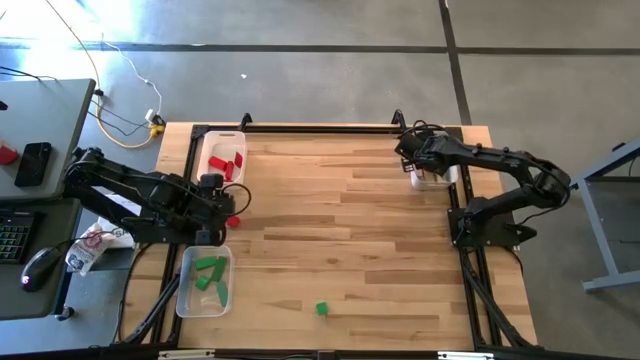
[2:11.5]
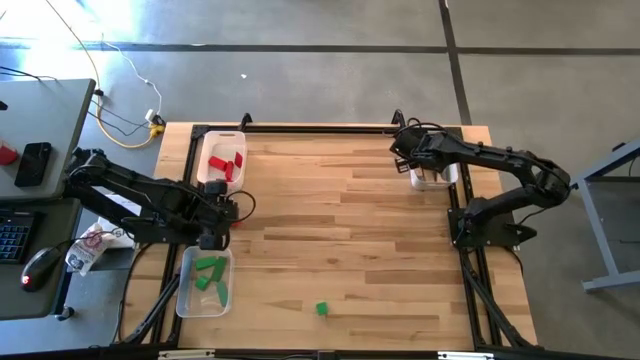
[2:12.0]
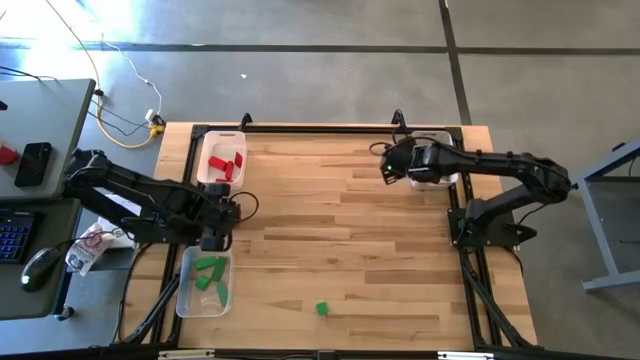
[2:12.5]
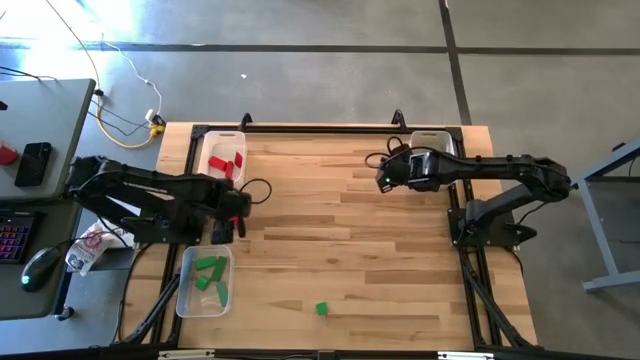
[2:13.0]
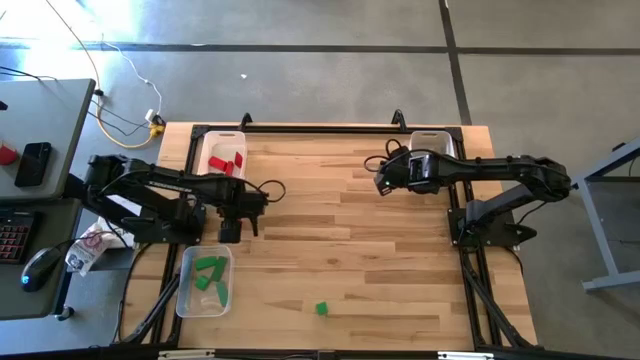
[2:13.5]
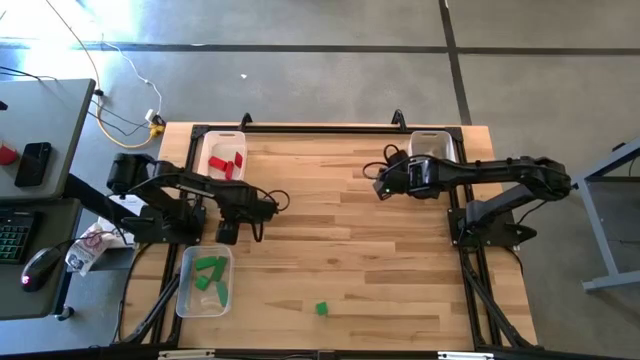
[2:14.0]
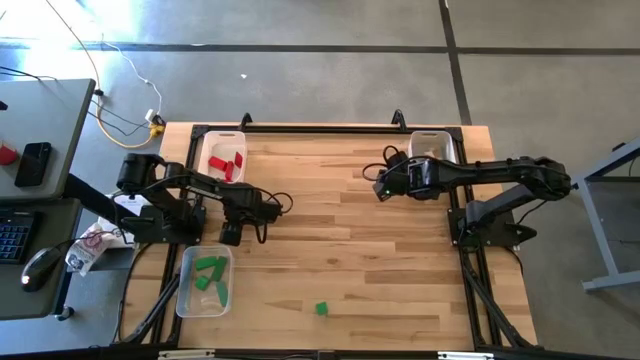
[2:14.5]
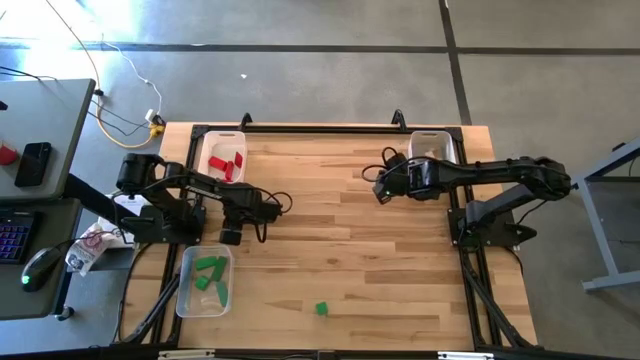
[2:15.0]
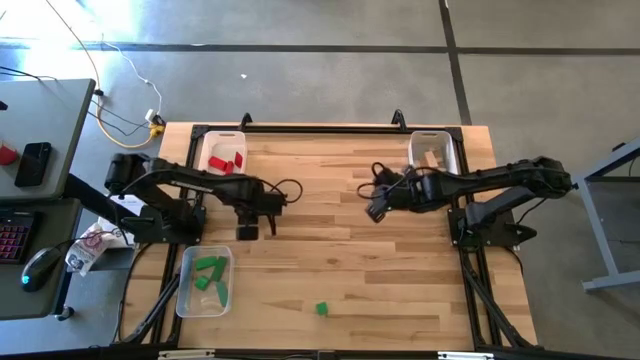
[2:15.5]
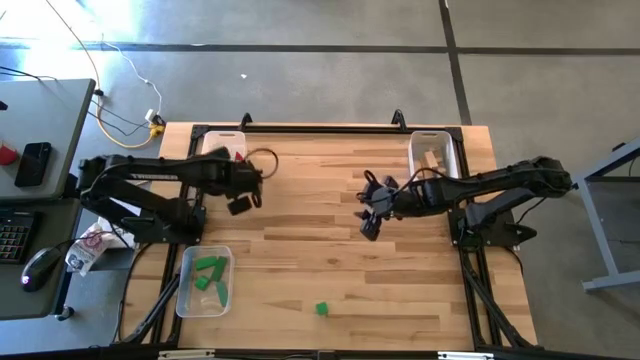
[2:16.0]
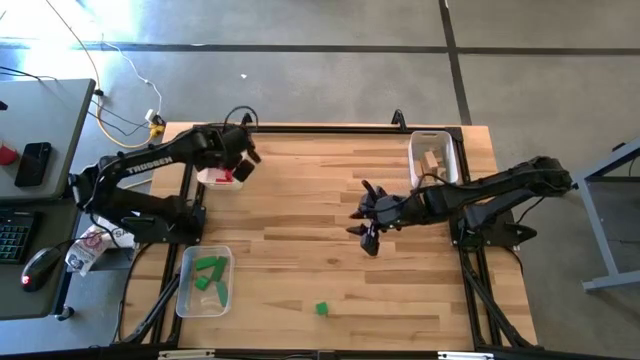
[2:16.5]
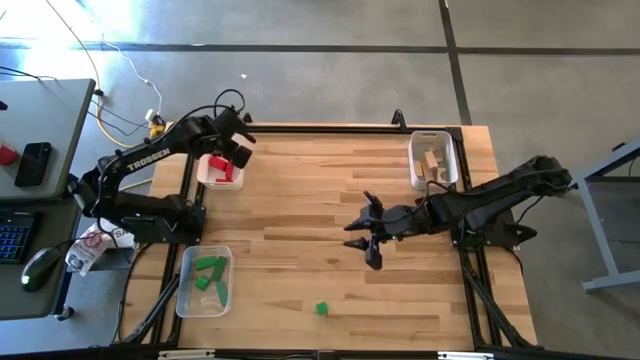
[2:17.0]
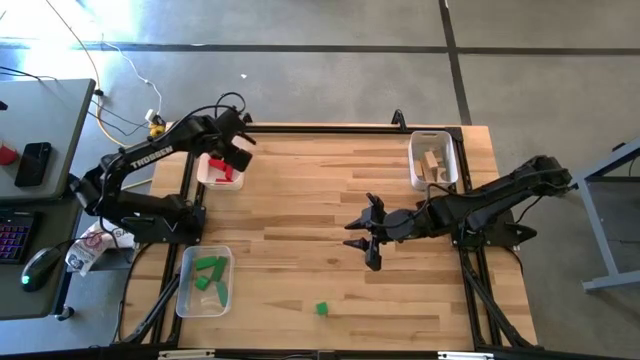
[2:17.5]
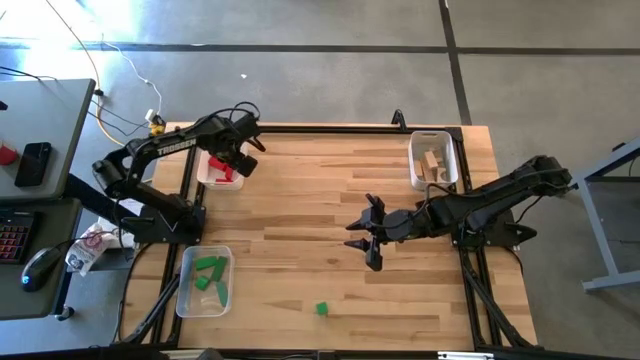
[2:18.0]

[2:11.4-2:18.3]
Task: Sort & place blocks by color
Put the red block into the white bin

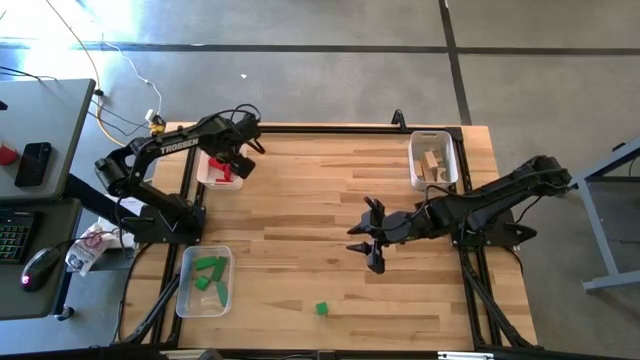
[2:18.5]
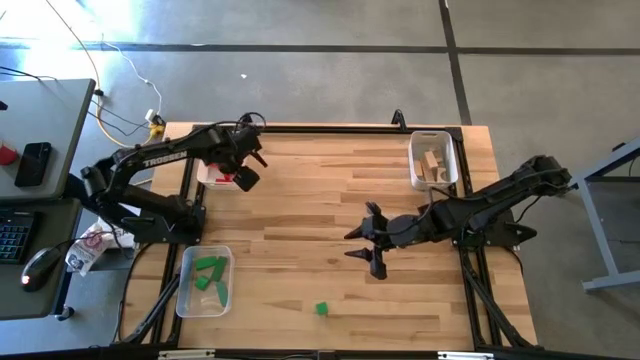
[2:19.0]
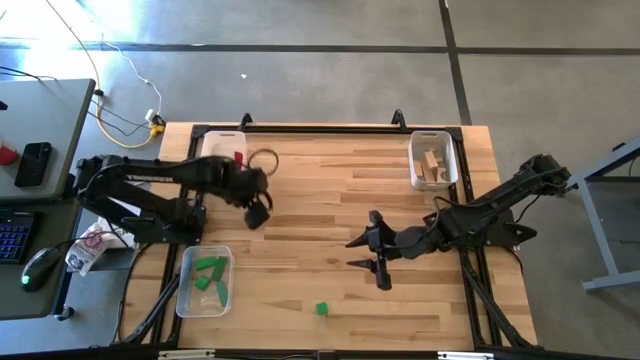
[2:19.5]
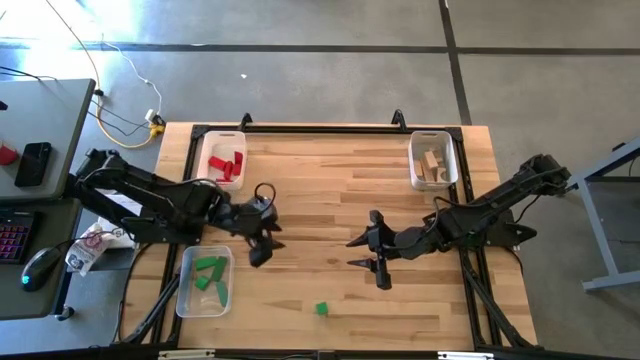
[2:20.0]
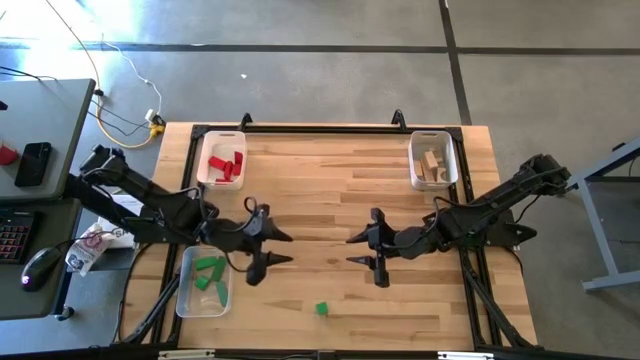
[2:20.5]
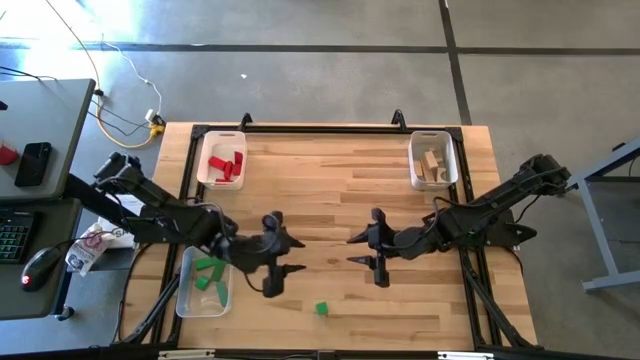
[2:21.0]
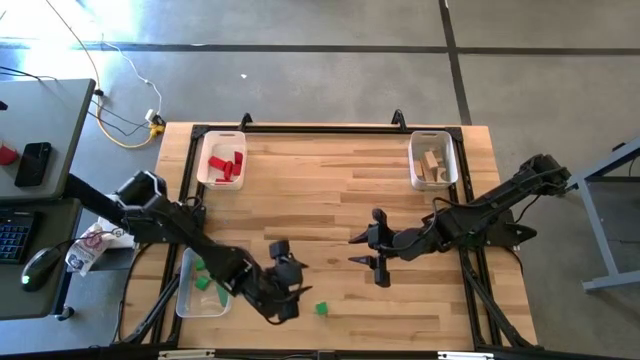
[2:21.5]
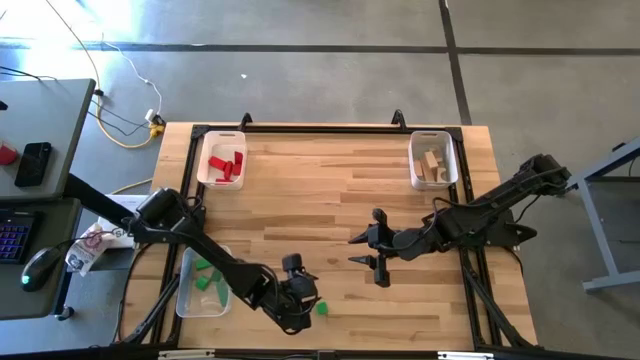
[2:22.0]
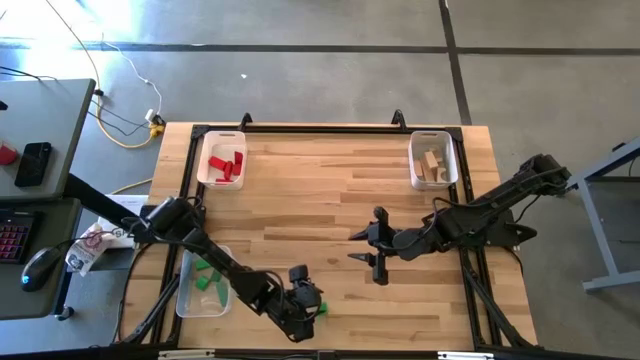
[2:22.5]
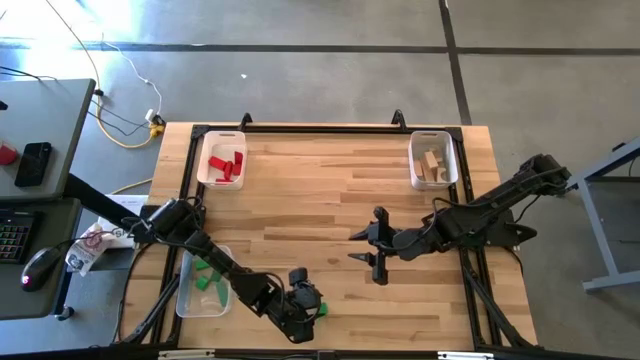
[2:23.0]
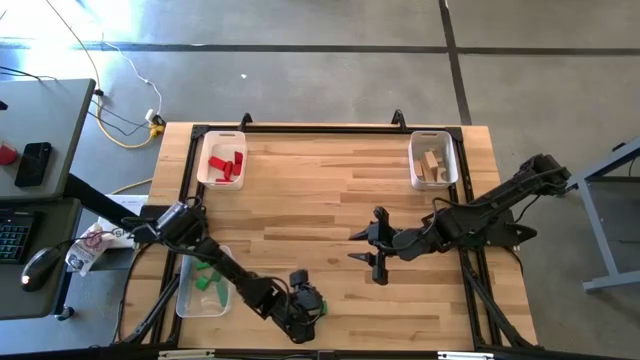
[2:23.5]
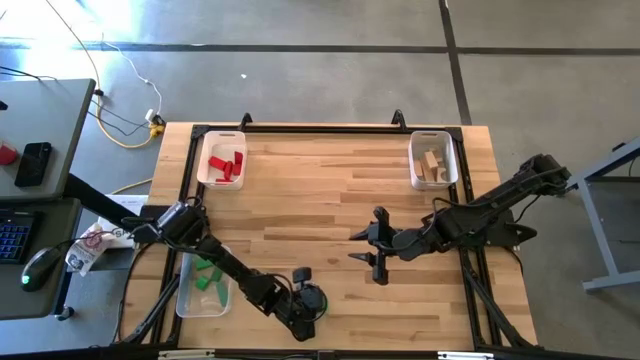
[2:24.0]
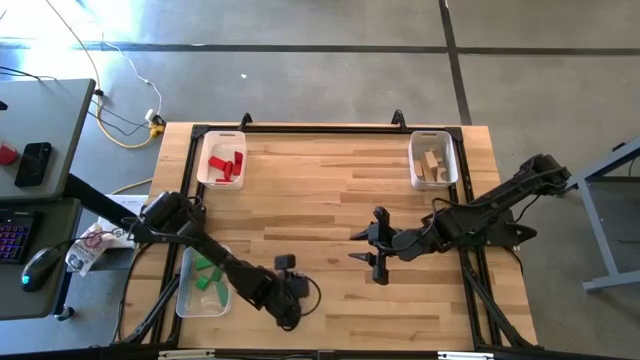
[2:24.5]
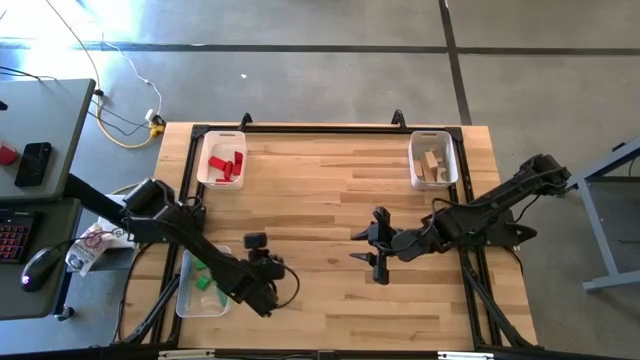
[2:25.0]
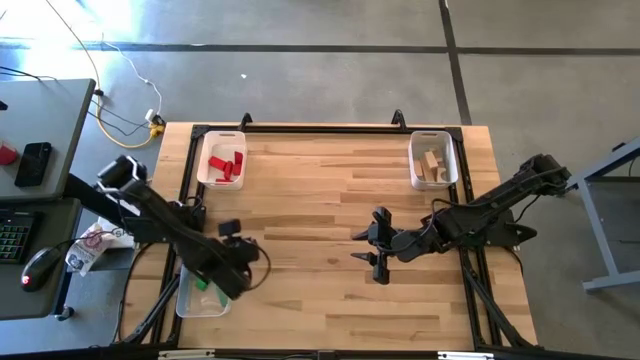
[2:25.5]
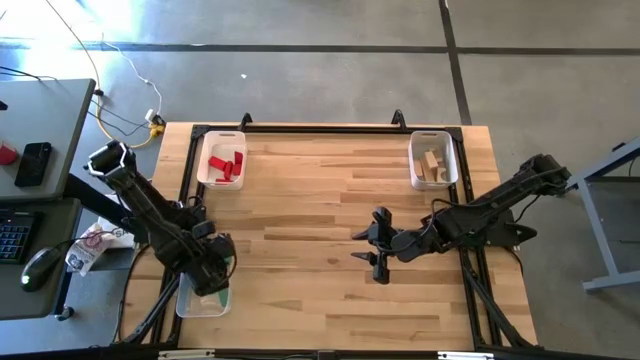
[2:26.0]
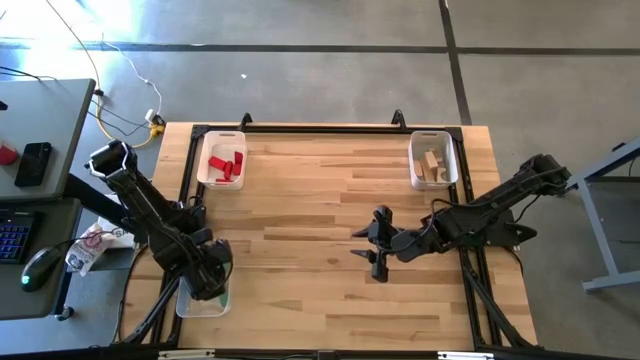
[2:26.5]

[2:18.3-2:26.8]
Put the green block into the transparent bin

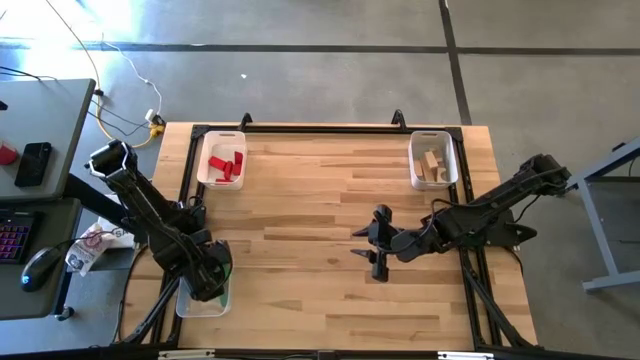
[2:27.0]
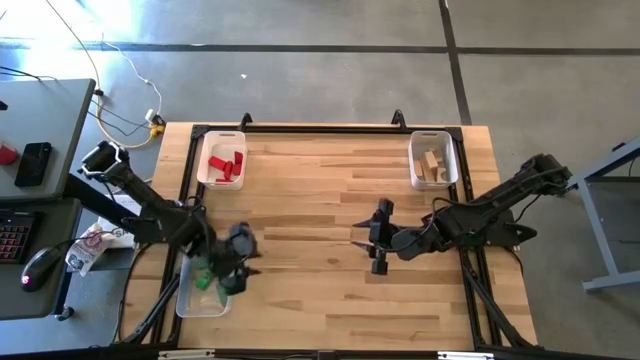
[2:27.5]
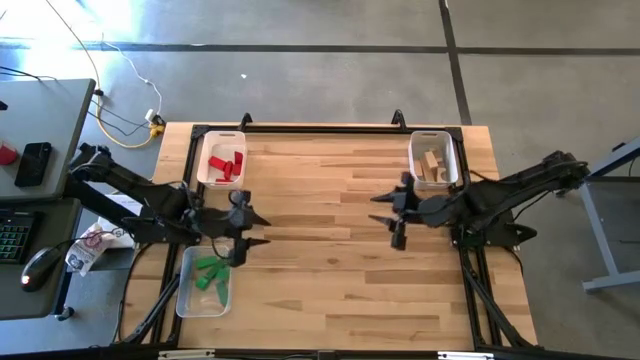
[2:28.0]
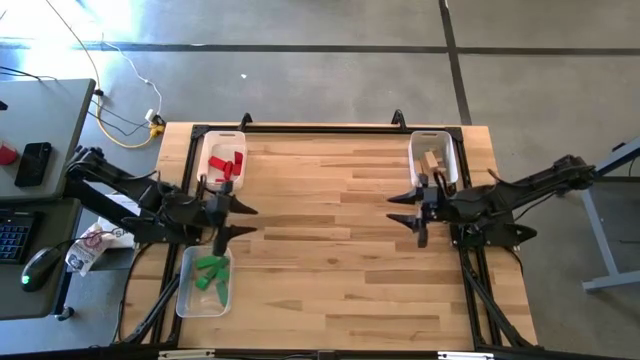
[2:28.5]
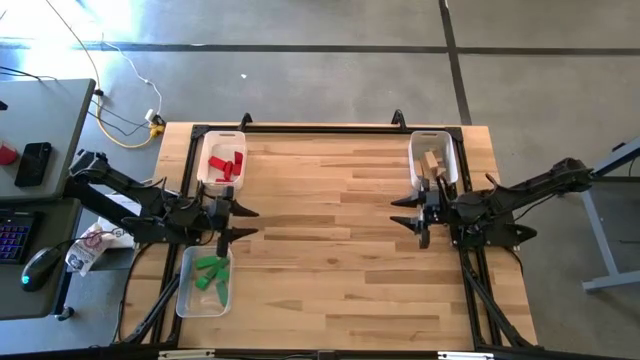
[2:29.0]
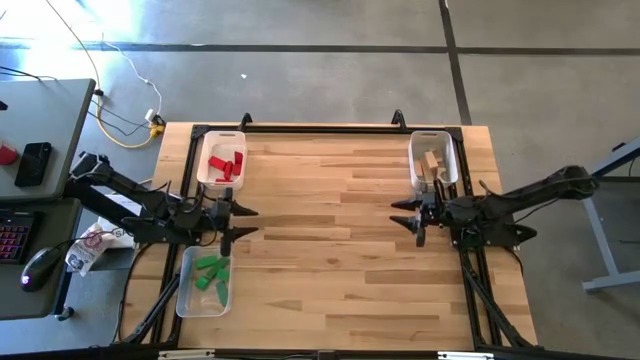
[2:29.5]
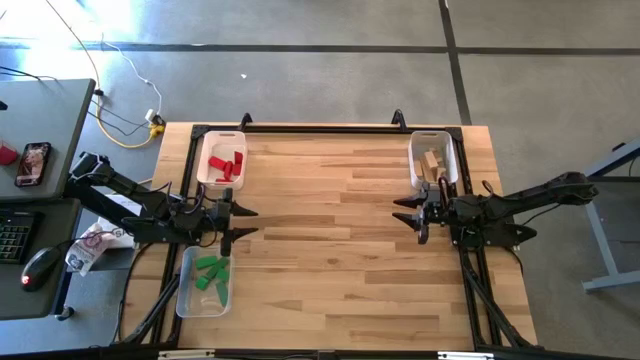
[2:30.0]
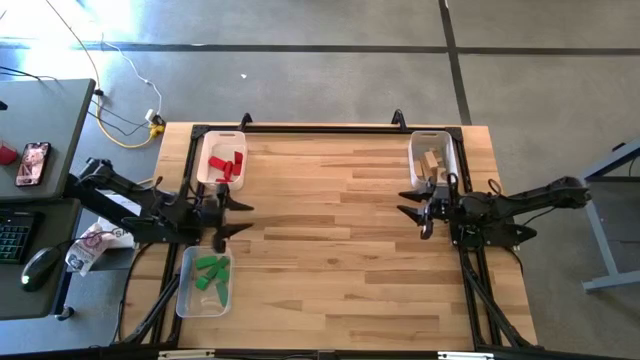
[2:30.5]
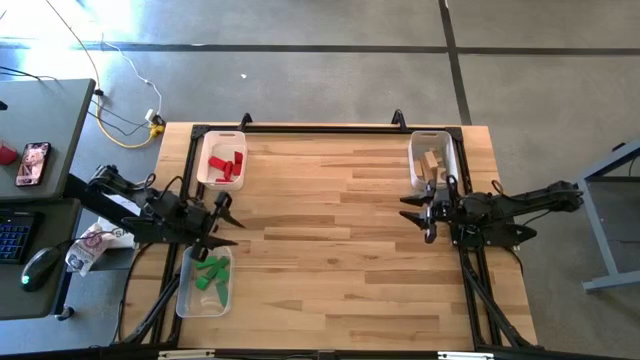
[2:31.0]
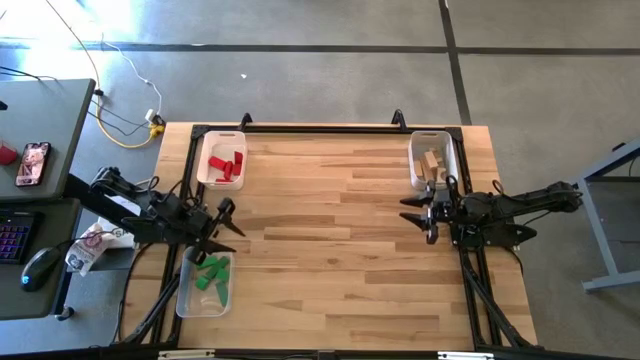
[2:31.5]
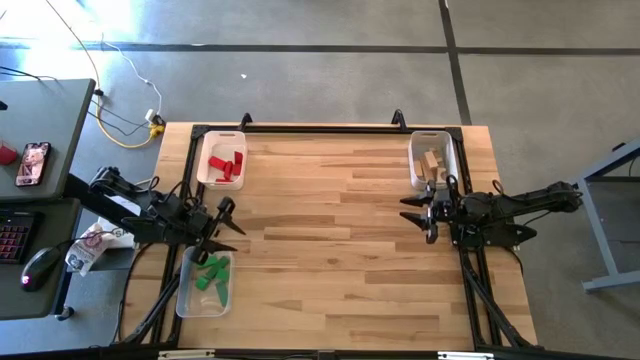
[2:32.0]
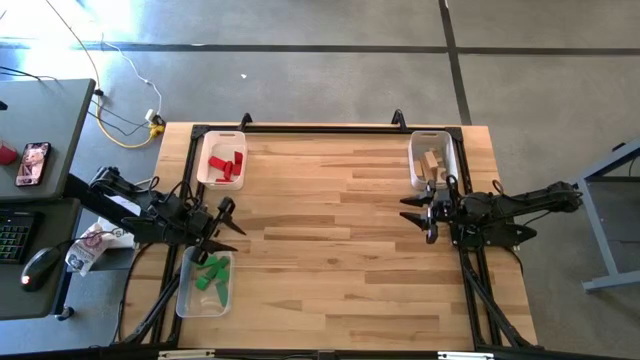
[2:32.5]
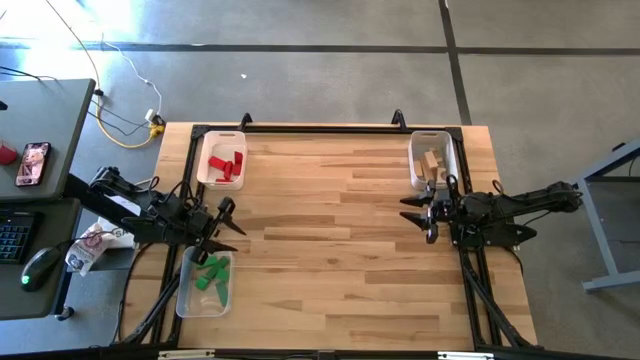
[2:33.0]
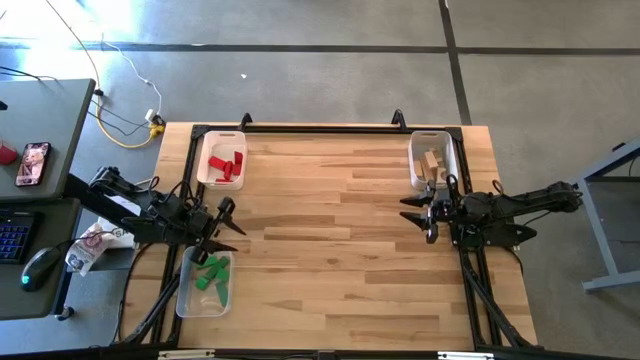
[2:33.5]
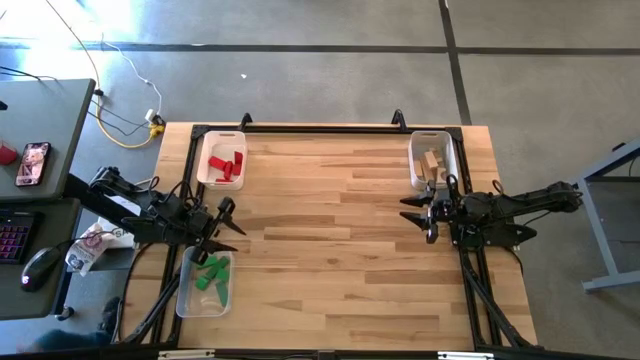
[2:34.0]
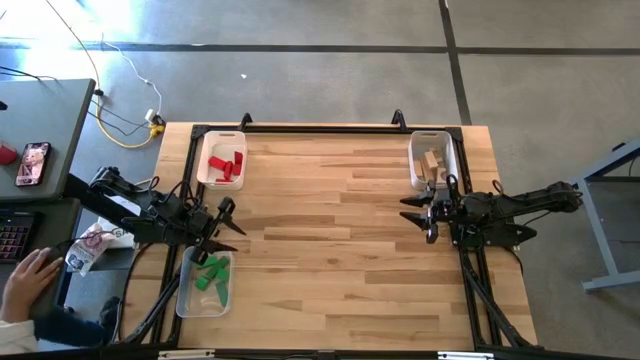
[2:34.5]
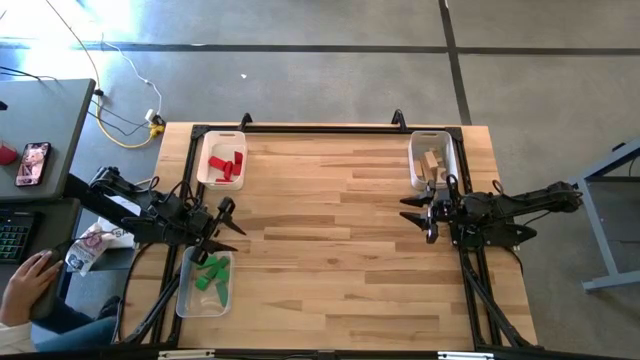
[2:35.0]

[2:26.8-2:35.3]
Return to Home Position
